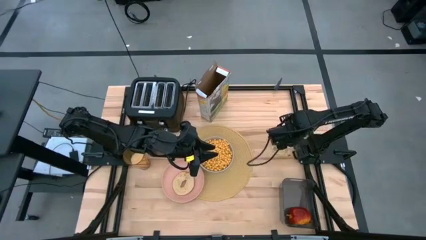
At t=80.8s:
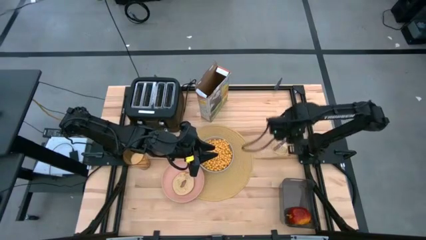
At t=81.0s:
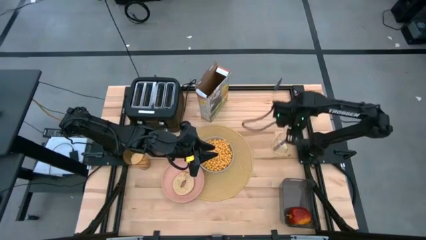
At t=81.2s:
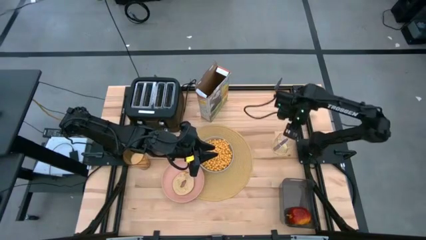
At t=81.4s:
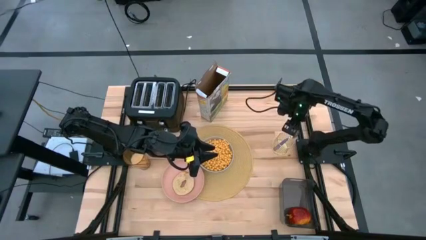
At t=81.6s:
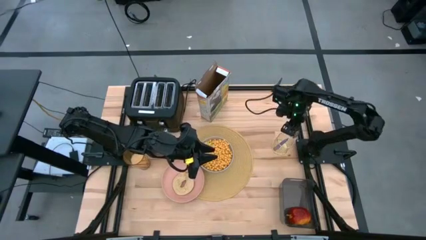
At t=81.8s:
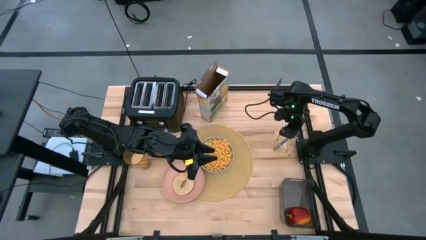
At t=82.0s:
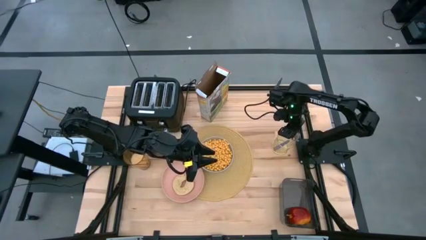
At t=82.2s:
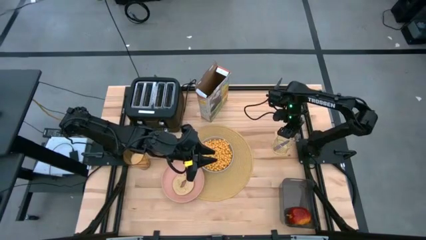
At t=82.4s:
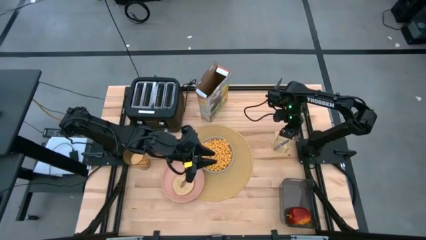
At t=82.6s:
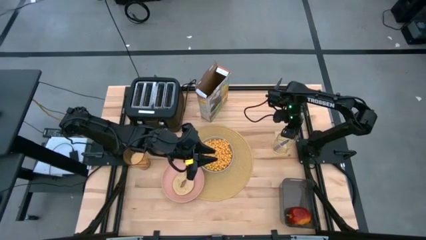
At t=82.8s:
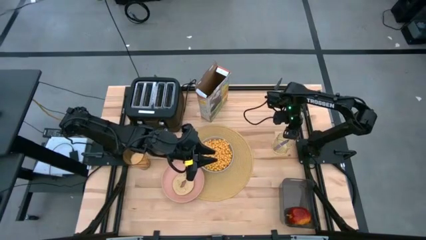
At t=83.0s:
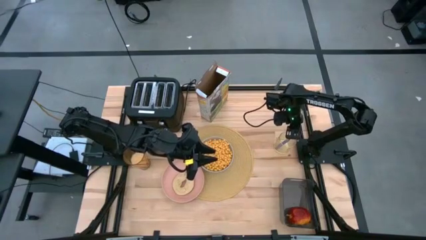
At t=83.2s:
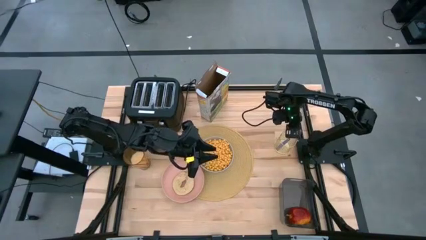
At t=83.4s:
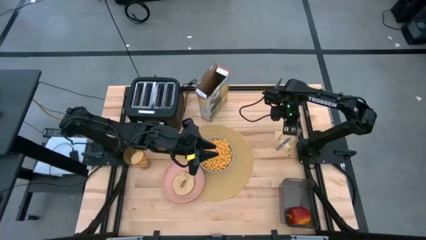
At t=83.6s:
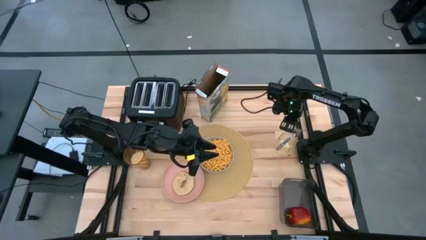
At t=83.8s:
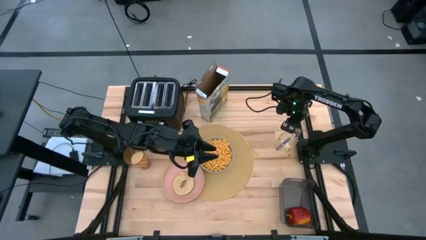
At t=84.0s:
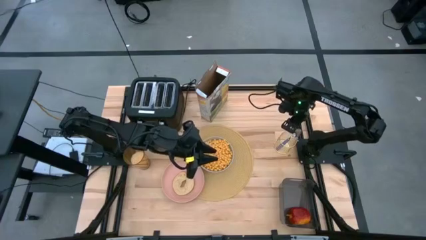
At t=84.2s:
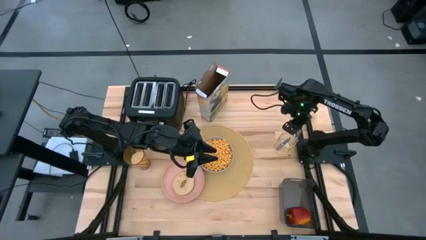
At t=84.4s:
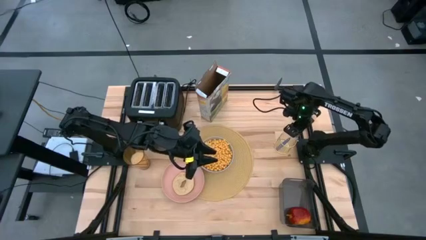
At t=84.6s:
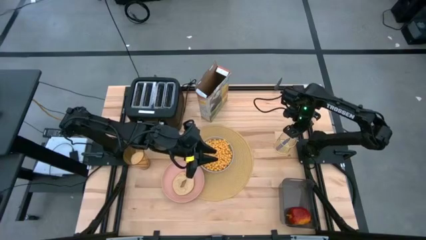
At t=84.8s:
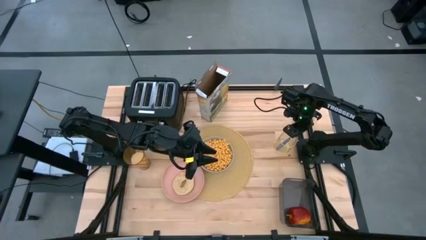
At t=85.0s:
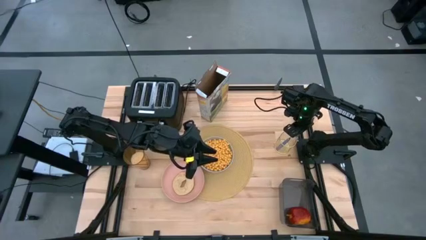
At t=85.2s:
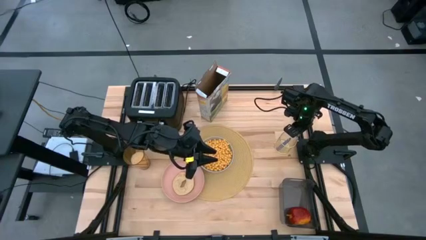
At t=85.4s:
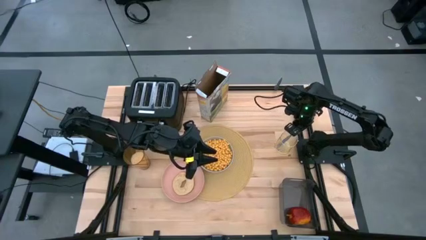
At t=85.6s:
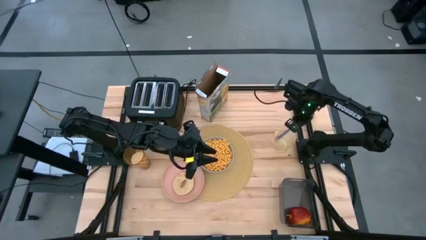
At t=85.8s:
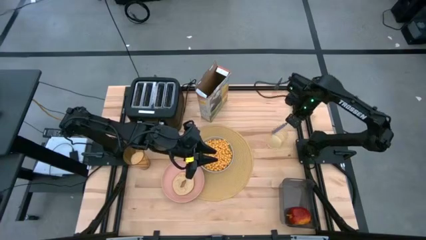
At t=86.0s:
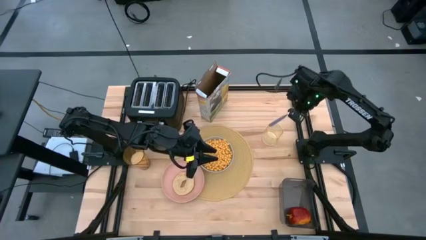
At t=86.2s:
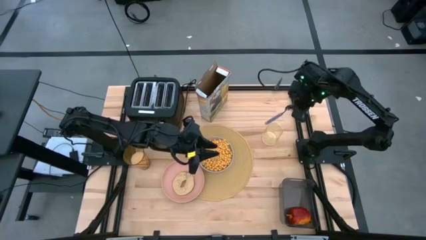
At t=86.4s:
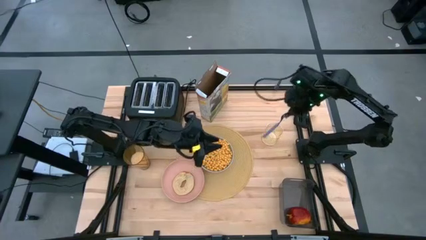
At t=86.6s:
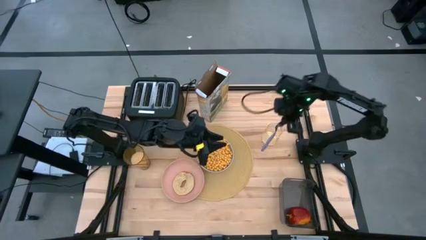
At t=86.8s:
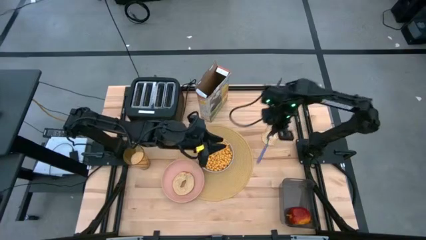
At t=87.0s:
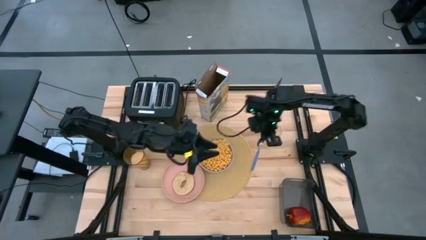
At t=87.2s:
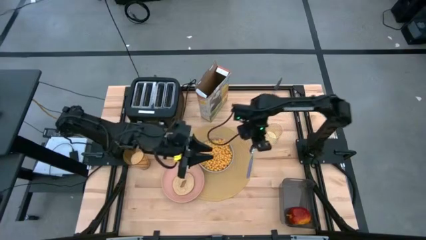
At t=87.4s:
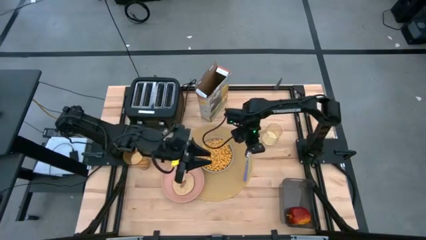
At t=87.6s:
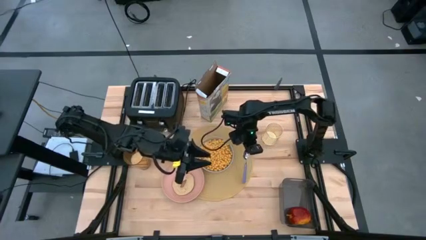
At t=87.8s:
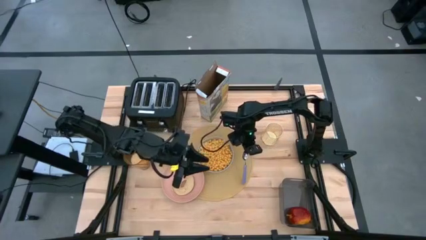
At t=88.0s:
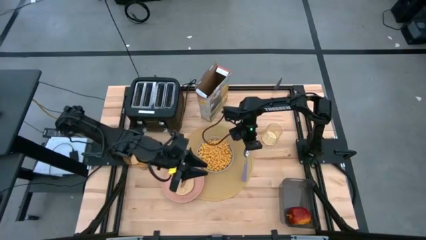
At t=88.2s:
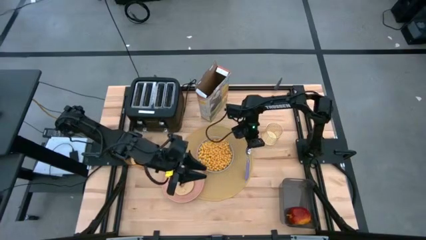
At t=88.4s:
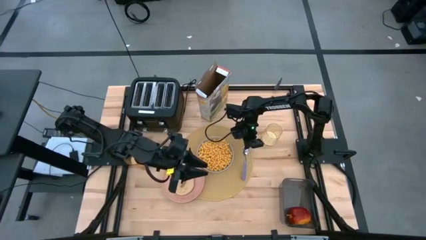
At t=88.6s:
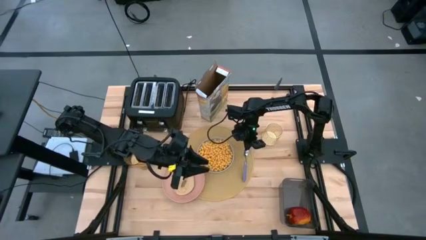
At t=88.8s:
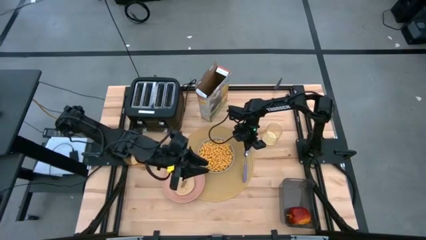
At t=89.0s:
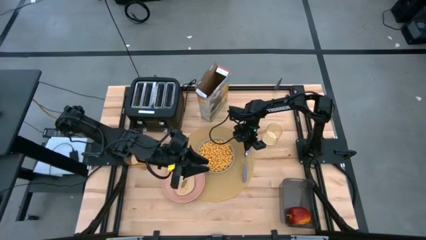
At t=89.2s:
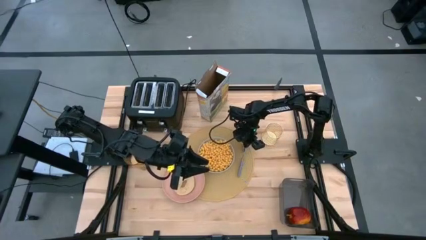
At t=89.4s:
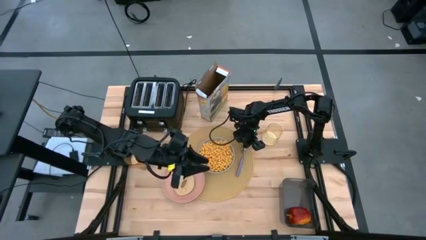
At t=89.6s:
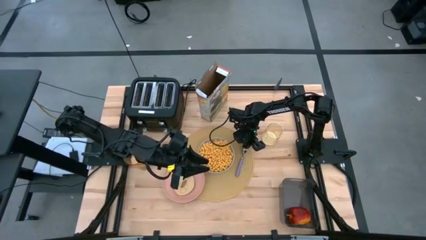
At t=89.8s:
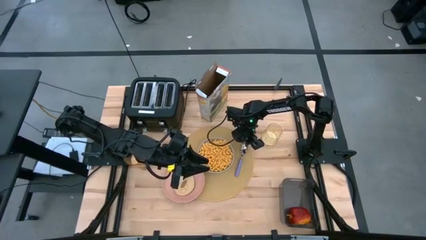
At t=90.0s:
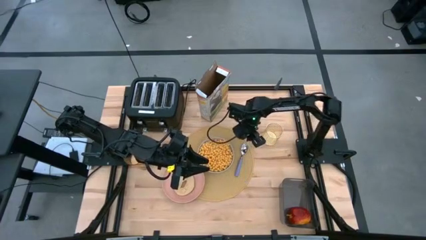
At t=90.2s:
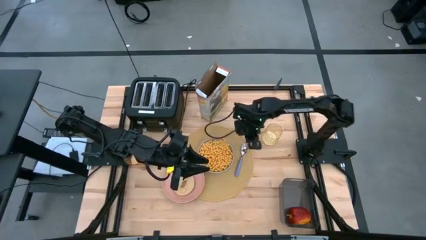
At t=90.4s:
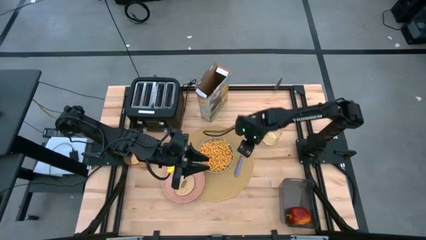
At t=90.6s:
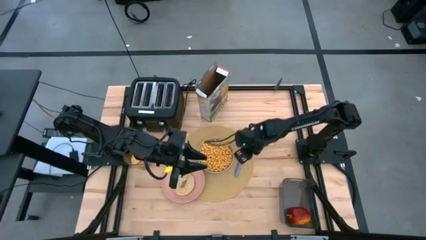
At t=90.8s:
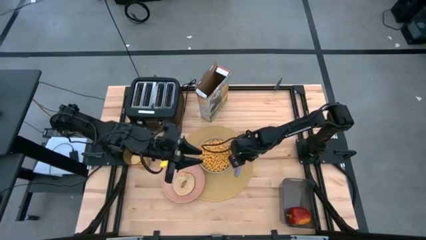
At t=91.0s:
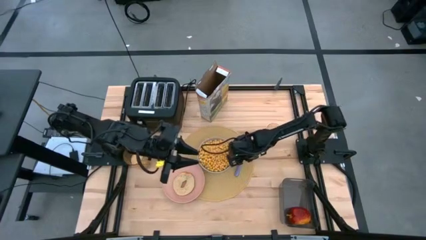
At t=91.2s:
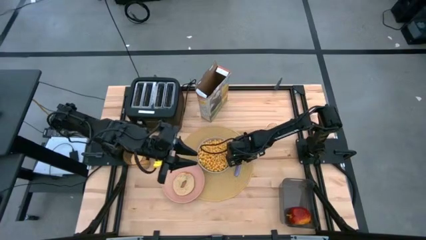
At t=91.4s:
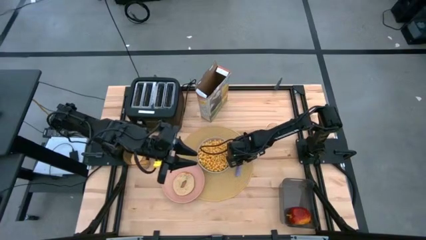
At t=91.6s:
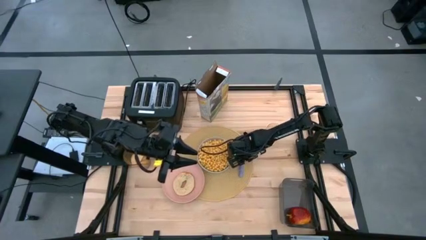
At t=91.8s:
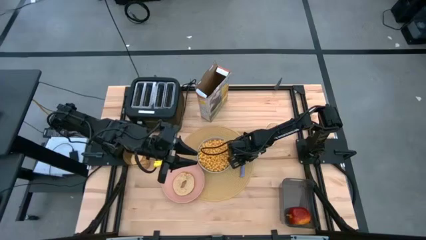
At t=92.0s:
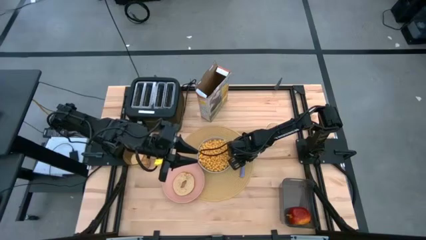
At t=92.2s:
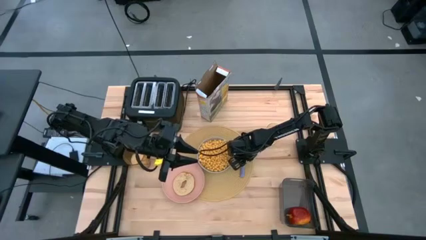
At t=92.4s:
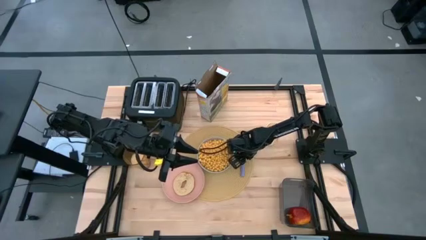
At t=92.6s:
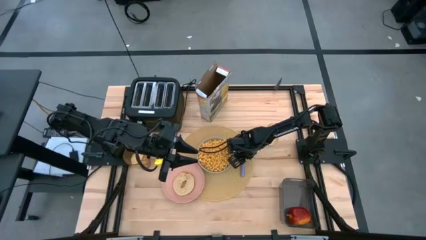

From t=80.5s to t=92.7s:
Task: Arrange a breakfast setting
Put the purple spoon on the brown placemat to the right of the gray bowl

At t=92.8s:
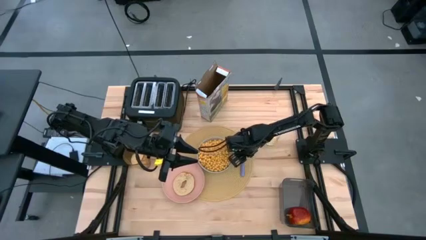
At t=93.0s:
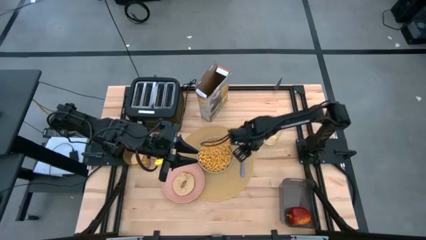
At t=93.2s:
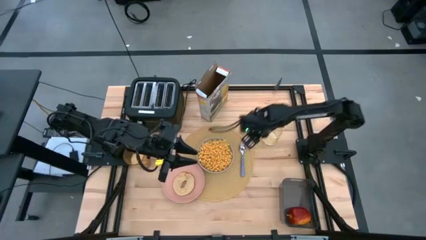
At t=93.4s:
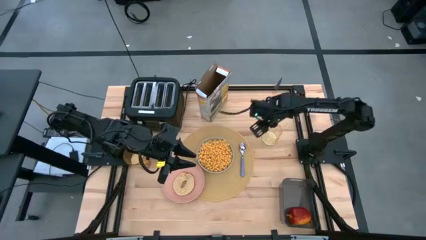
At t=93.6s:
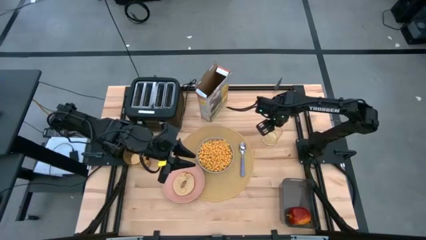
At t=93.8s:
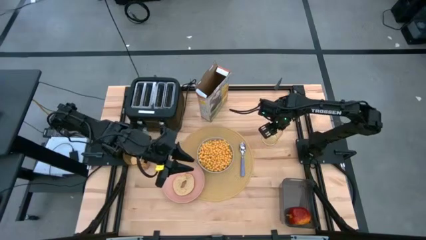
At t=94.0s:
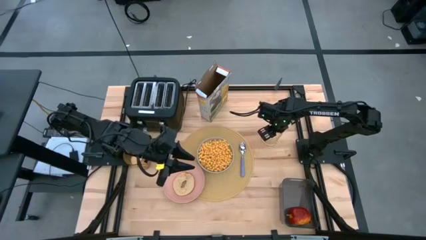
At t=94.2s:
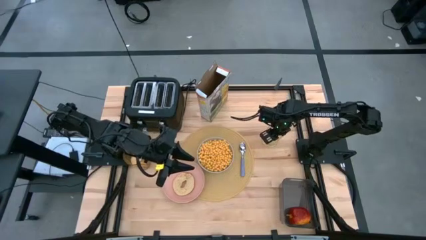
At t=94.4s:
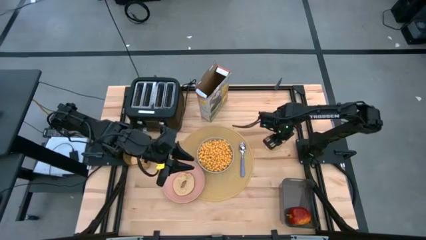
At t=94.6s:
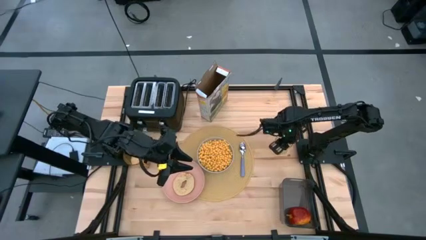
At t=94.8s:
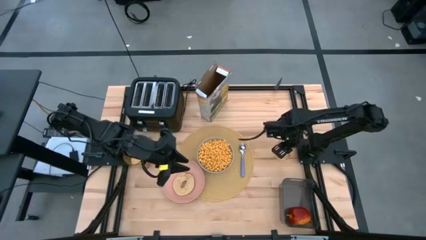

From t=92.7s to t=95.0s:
Adjust the gold silverware holder

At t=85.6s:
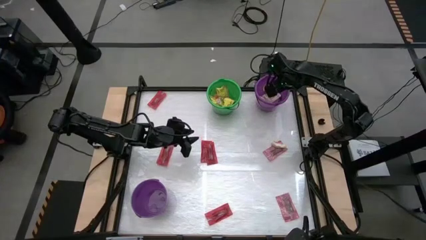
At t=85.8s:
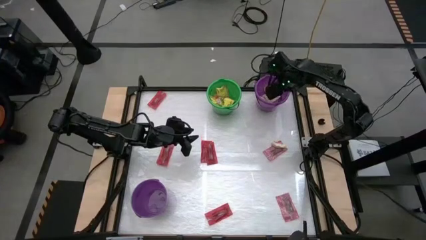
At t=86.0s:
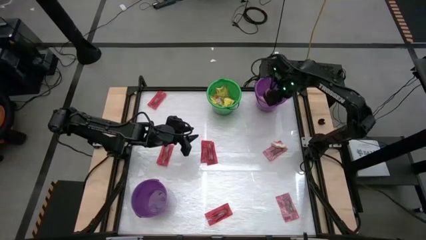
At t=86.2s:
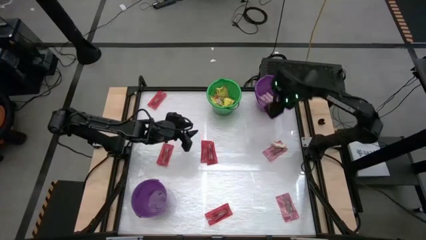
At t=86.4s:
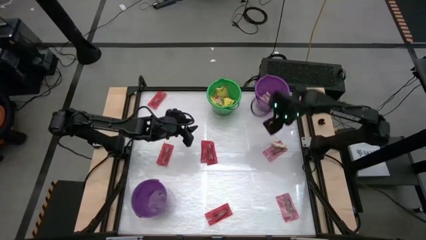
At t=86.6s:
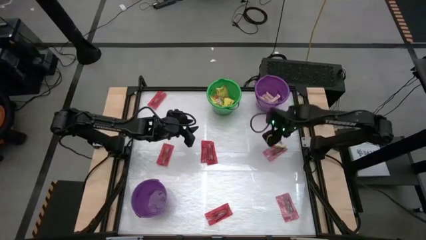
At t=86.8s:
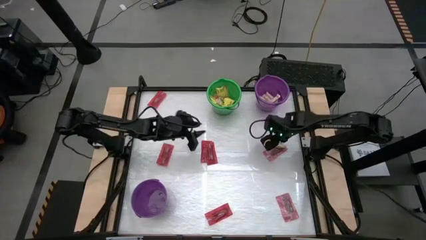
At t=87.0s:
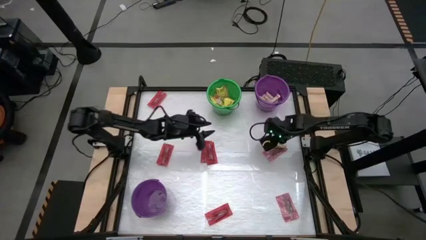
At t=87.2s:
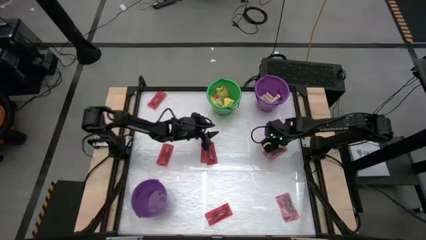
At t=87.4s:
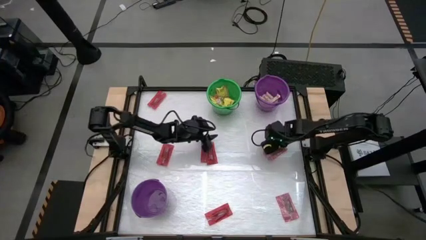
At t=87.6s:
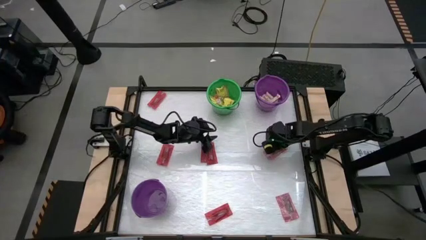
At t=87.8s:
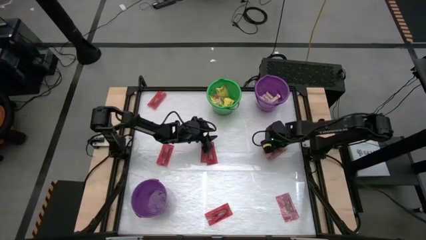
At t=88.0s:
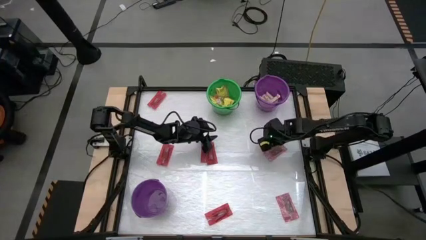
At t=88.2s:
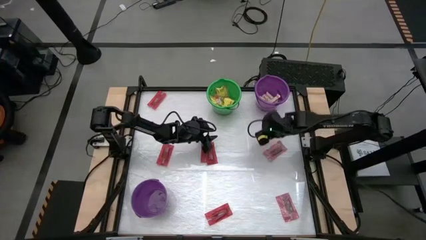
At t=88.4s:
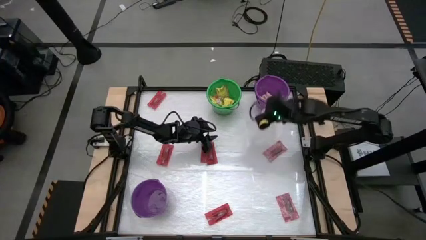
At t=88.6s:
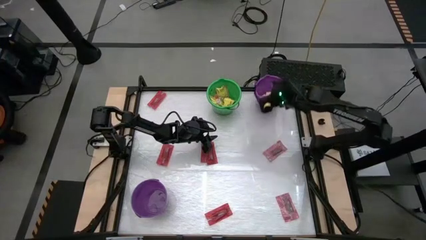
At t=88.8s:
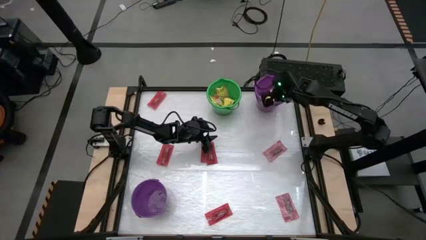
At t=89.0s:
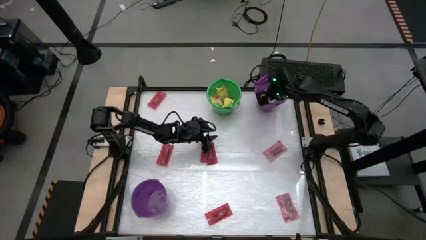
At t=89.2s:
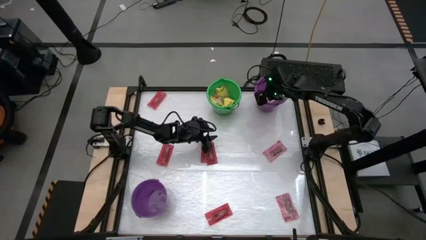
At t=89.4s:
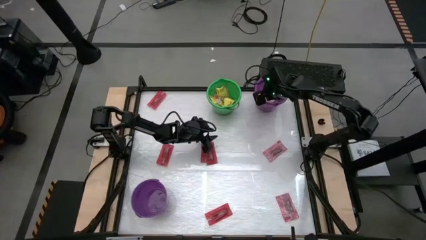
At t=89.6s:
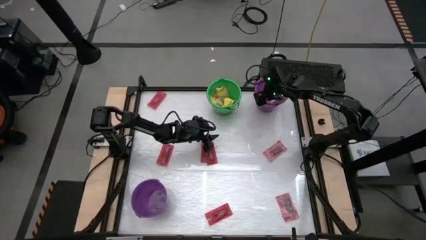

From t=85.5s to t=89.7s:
Task: Sort candy by brand, put in halloween buckets
Put the light brown chocolate bar into the top violet bucket
